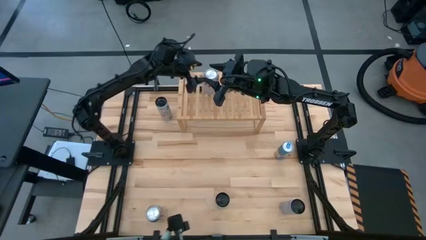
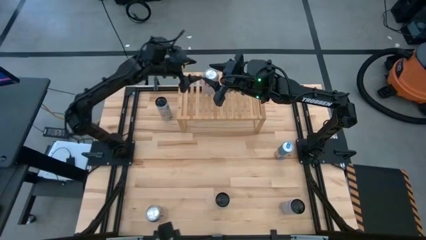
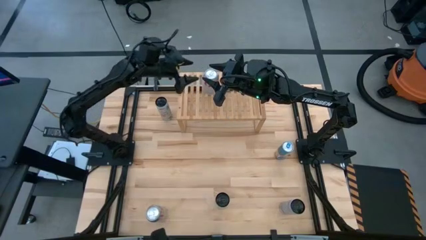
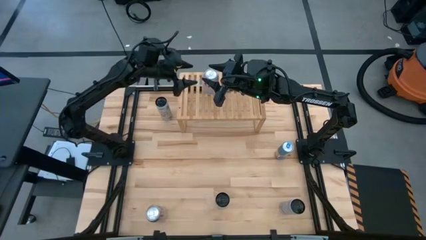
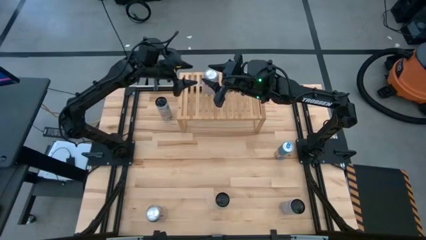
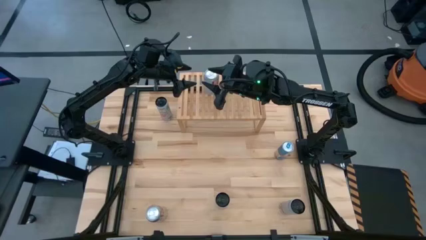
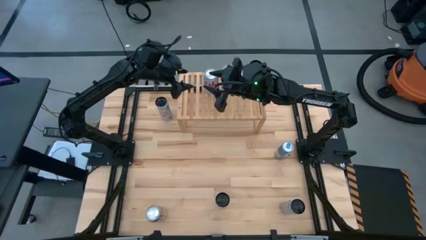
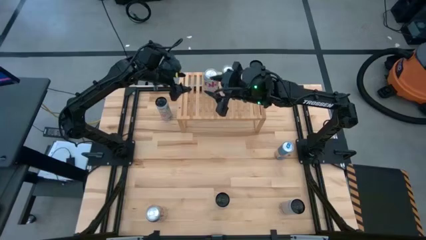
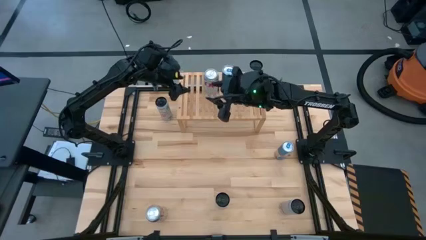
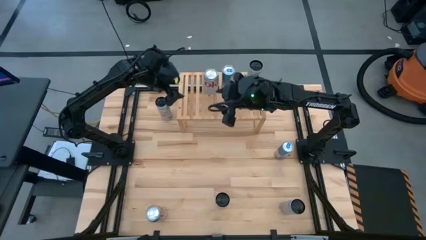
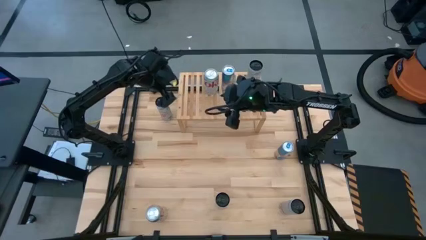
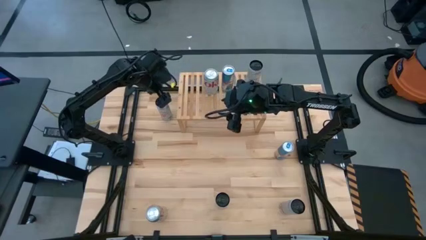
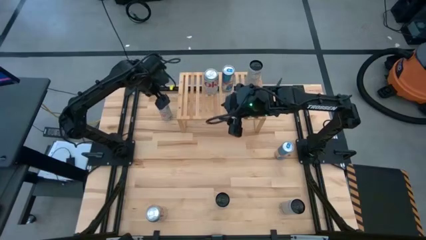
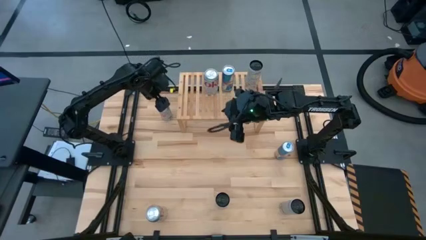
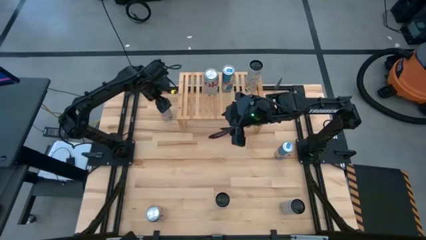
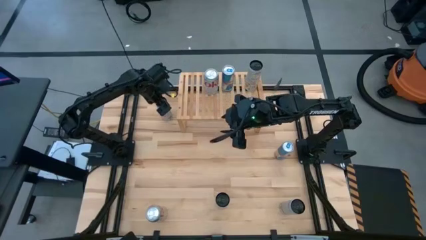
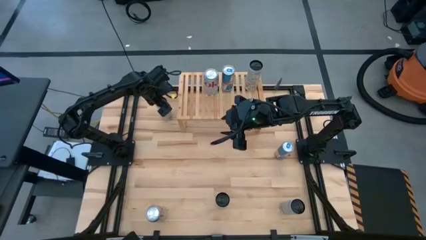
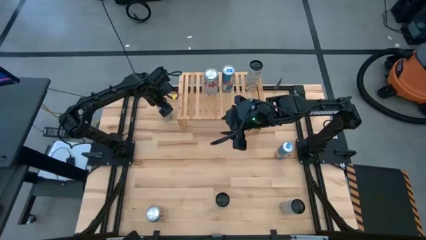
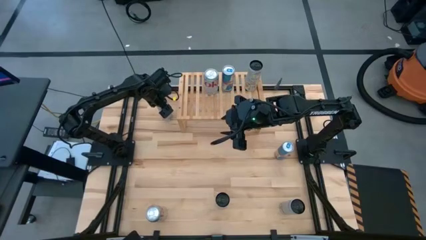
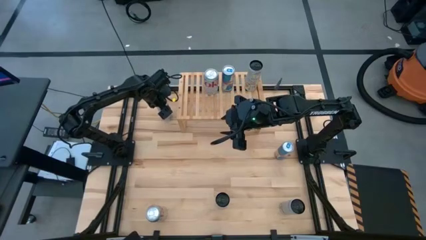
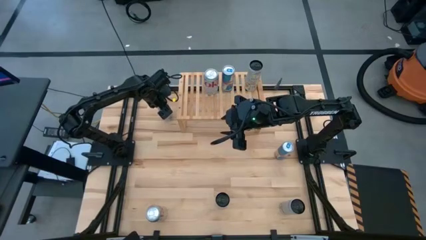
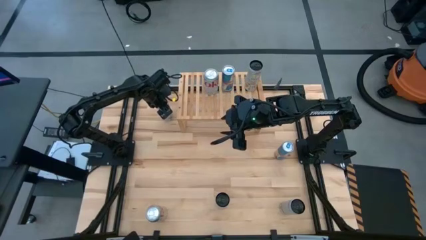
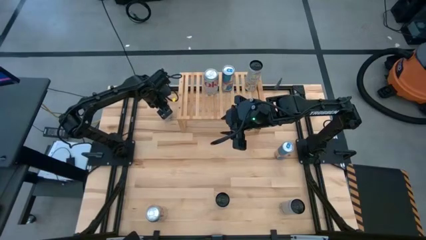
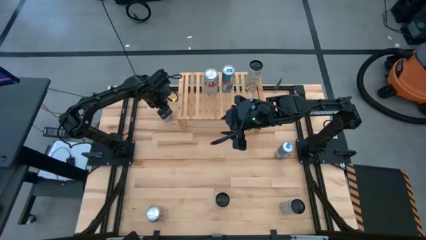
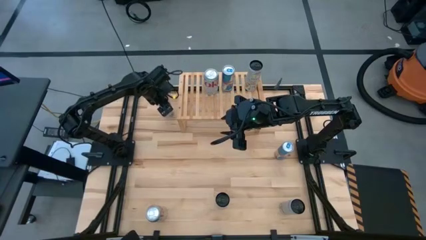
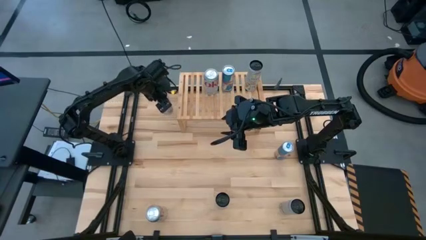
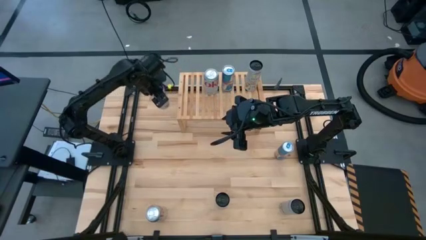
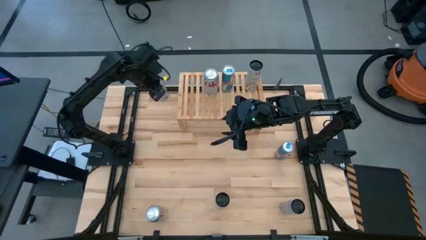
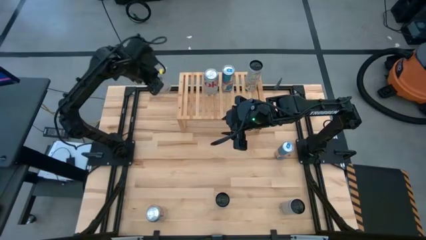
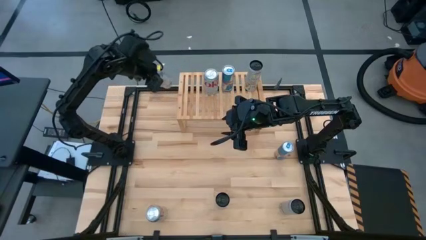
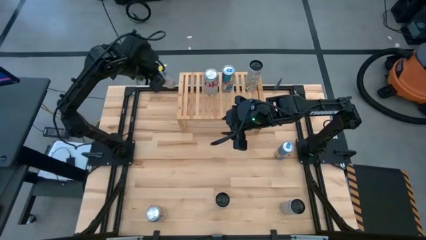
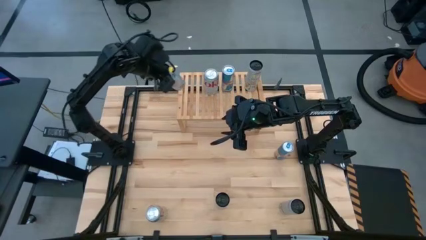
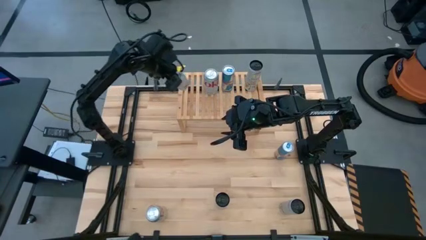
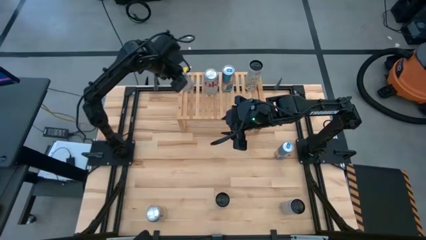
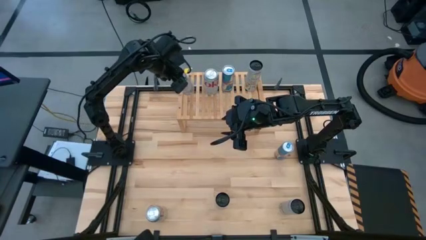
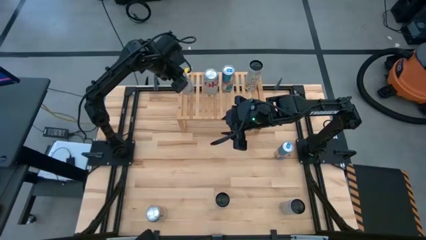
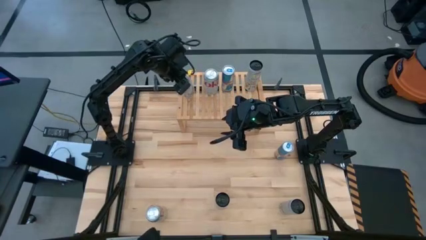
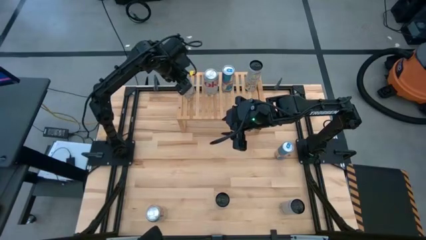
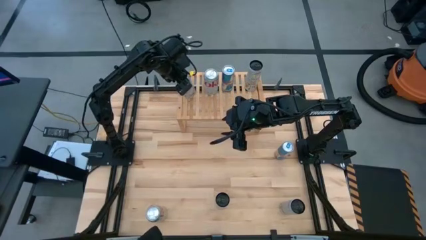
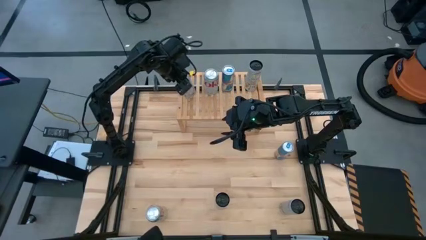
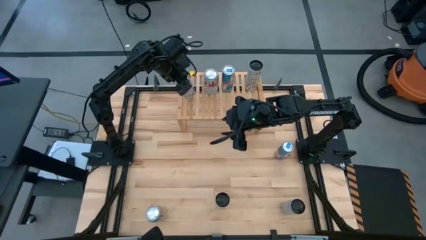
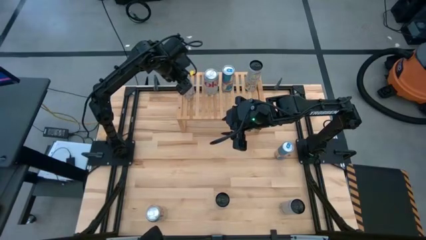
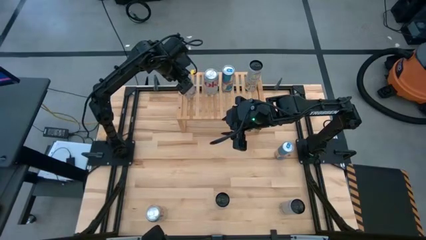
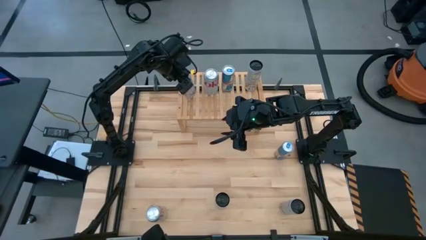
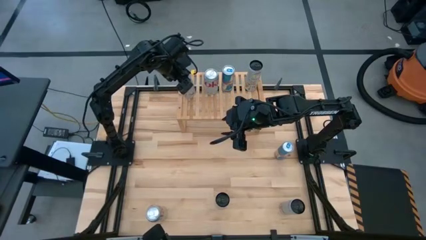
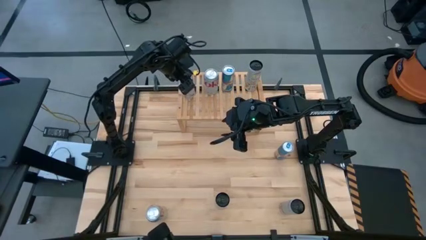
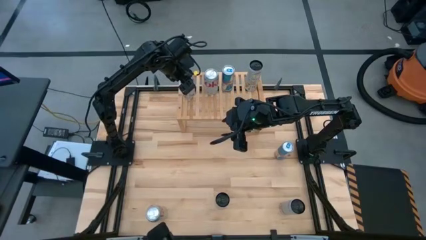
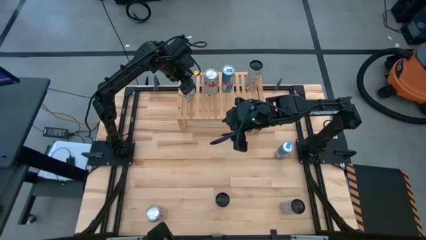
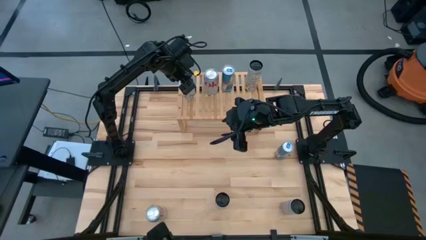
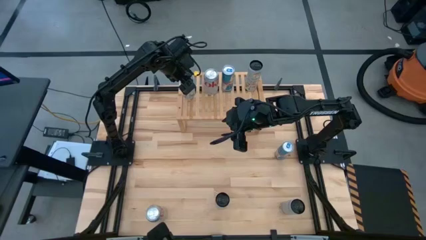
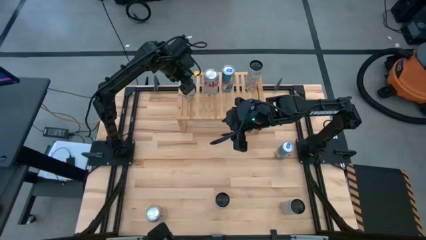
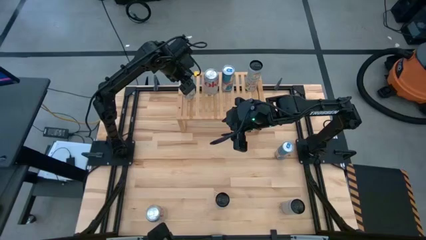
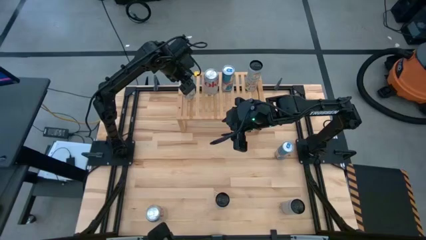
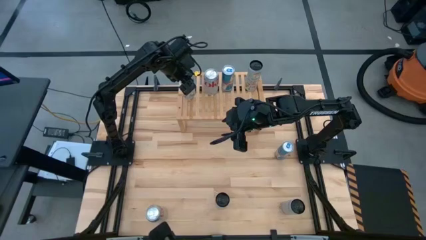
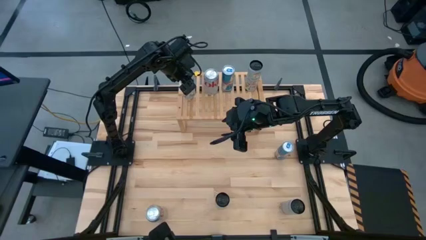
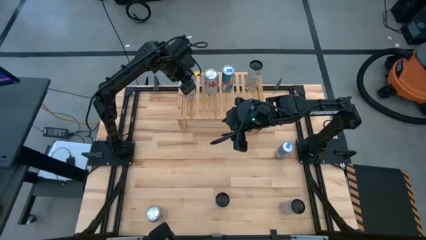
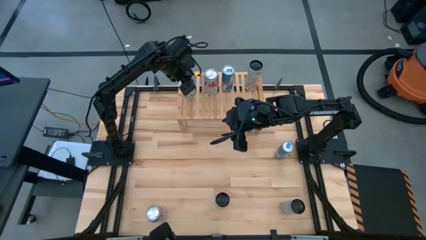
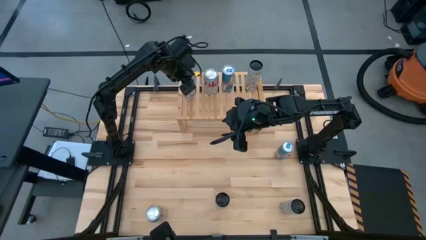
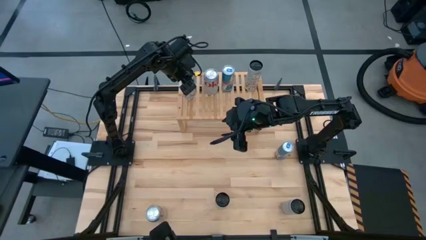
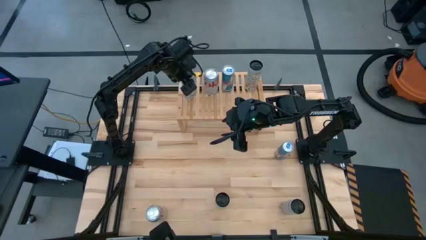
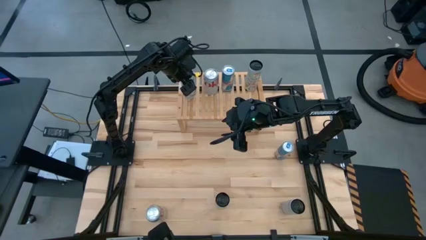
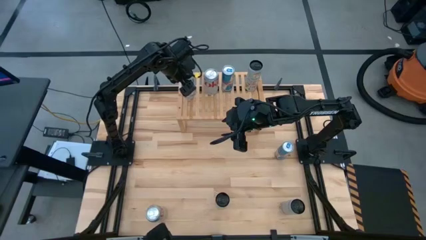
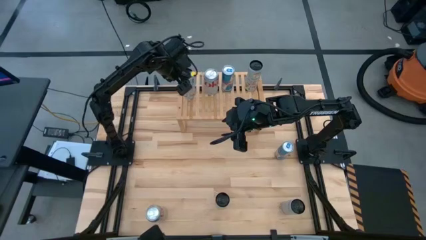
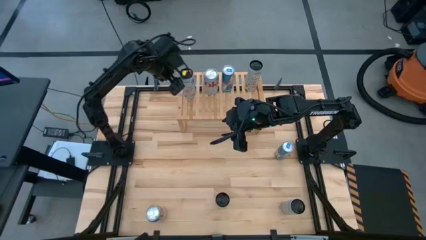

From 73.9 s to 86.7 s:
Task: Place canned beverage on shelf
Put the left white pink soda can on the shelf
